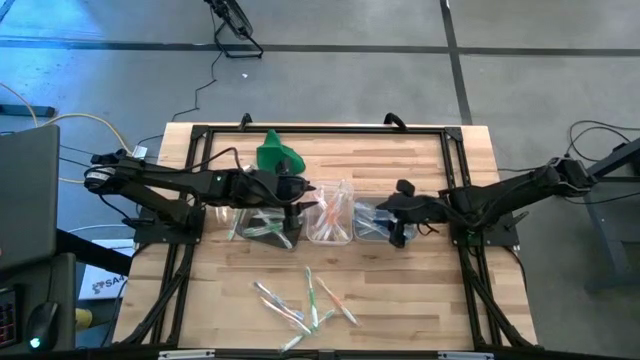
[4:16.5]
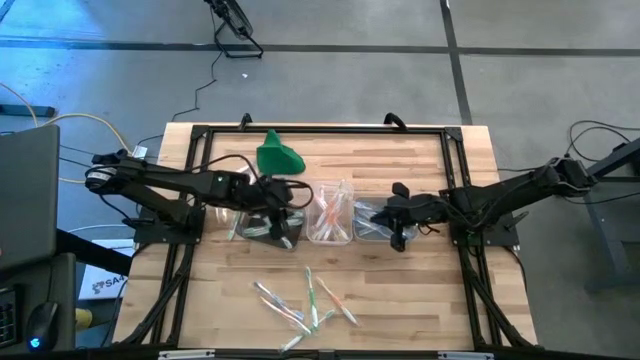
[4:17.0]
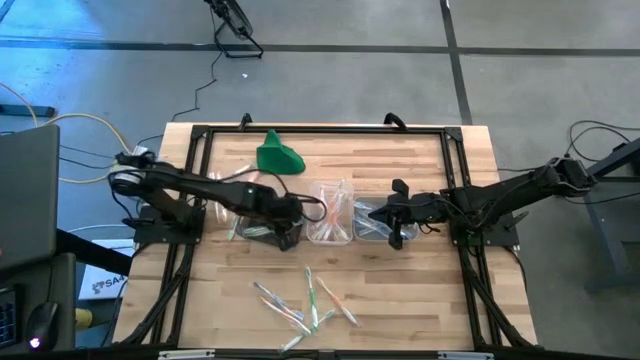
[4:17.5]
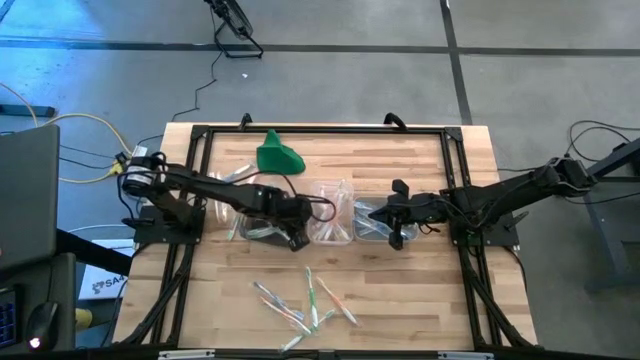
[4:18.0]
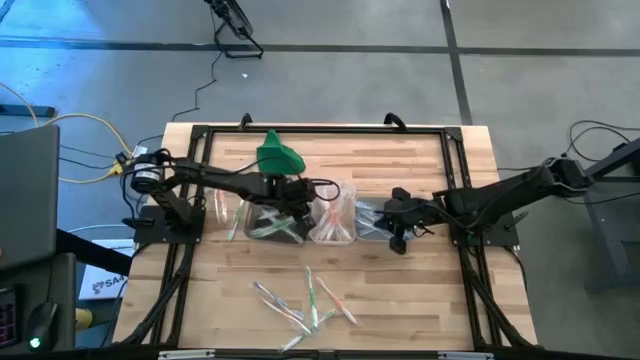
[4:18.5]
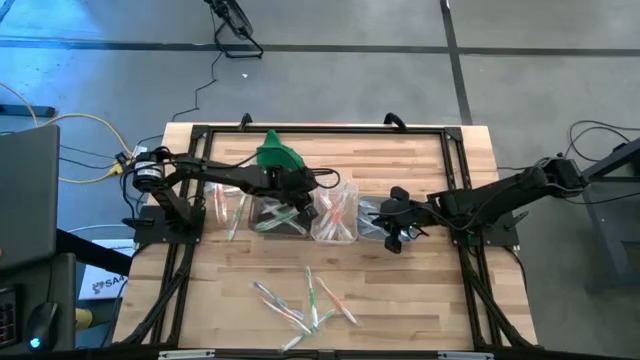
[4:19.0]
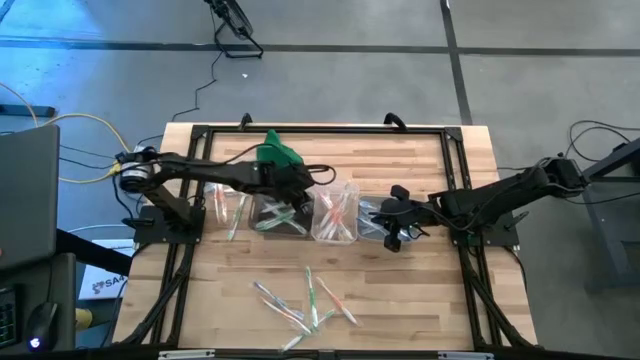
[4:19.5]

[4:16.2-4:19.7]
Task: Pick & Place Toothbrushes
Adjust the black bin on the table

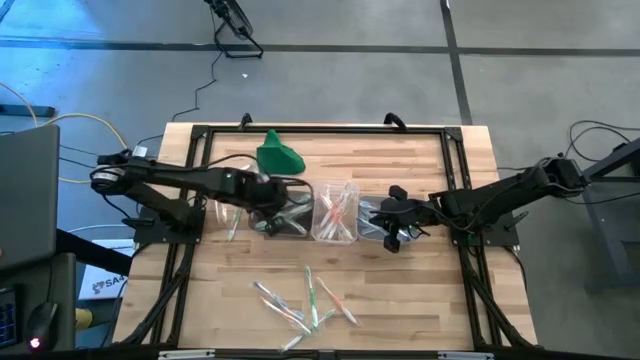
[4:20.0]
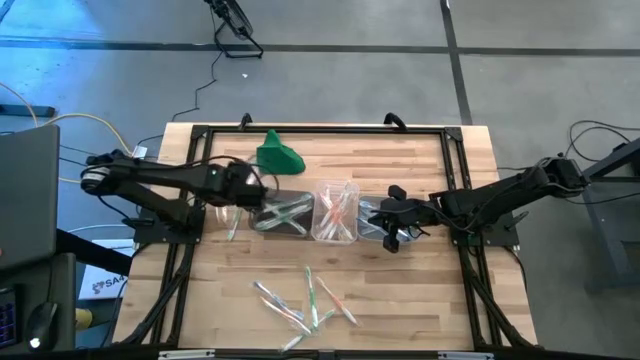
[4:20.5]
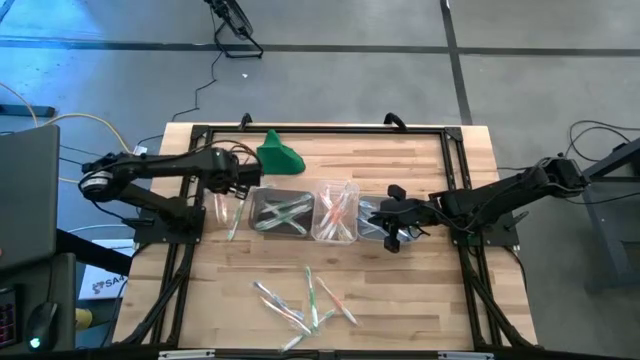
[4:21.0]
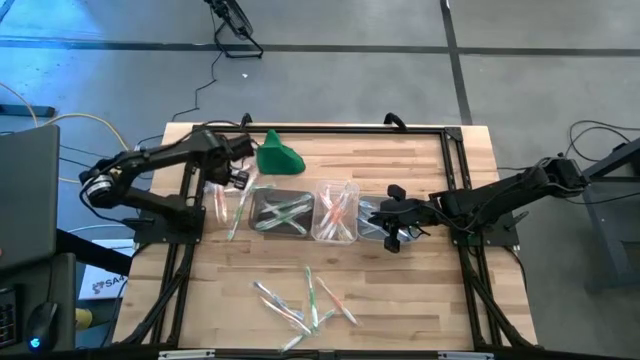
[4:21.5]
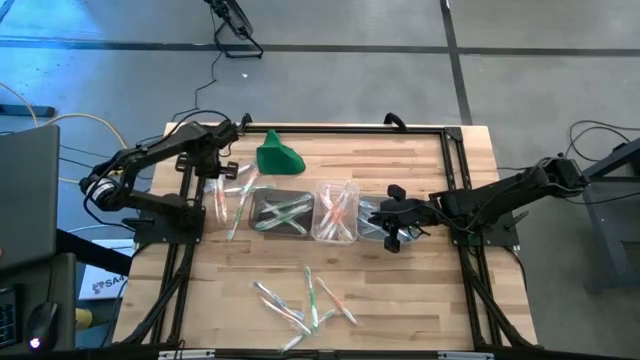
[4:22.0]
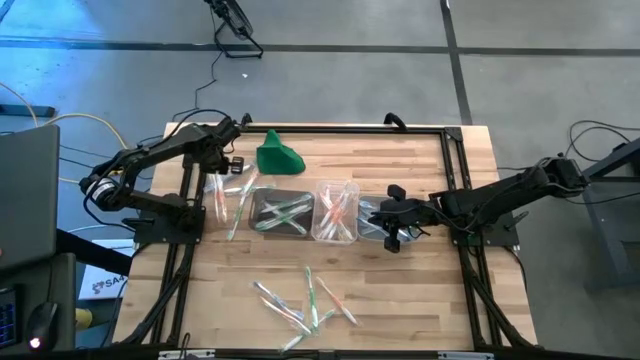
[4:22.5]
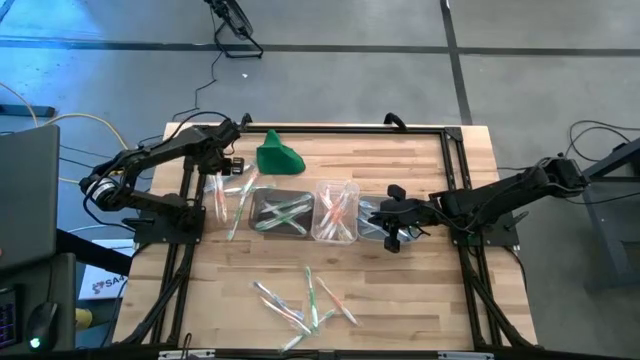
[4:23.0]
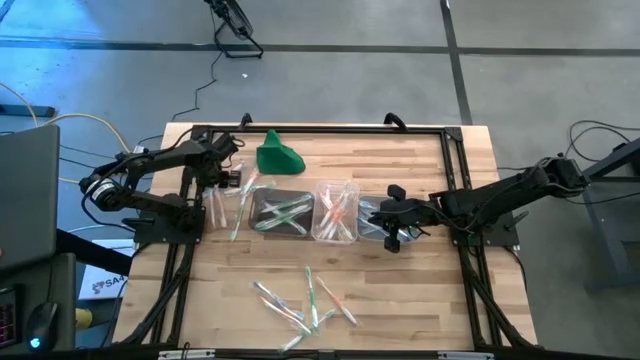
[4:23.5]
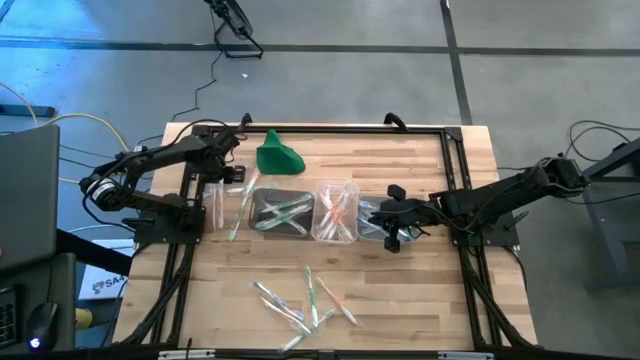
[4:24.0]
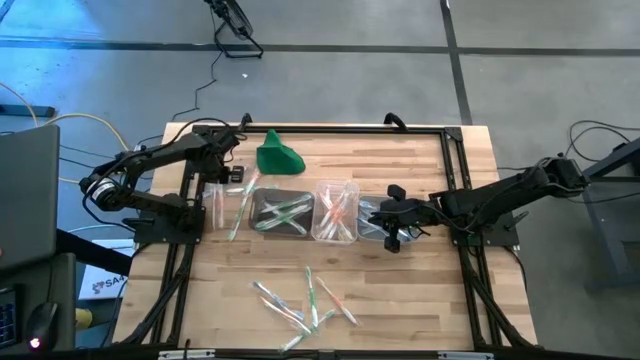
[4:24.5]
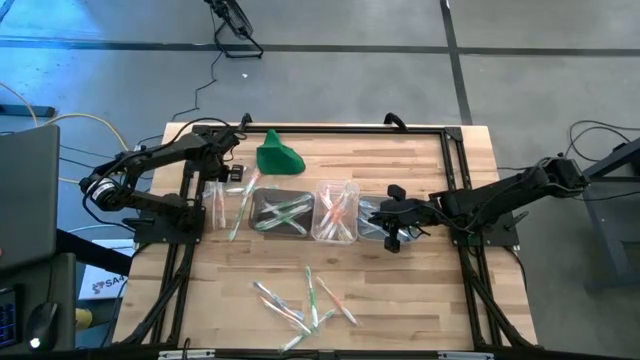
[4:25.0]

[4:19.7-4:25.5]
Put the orange toothbrush into the transparent bin

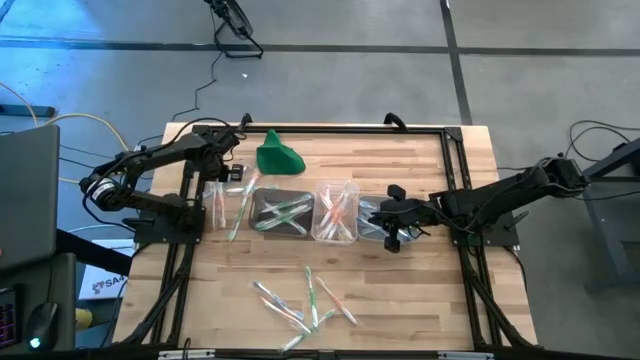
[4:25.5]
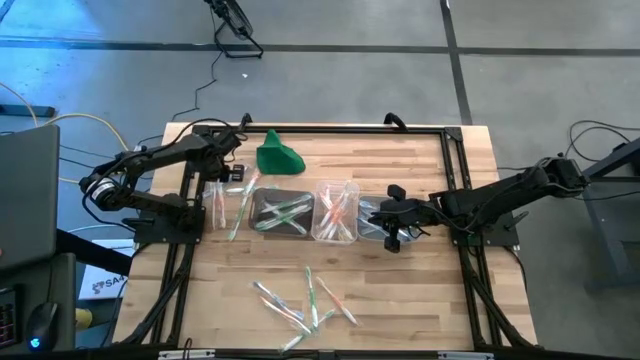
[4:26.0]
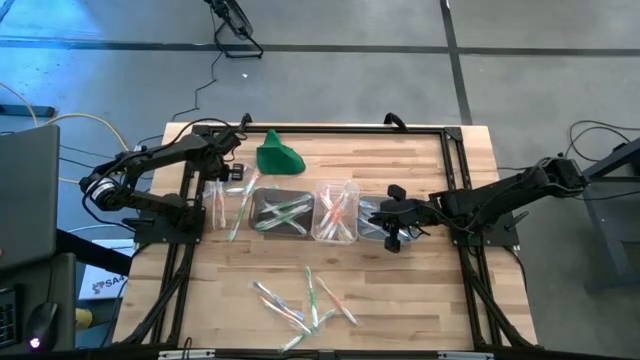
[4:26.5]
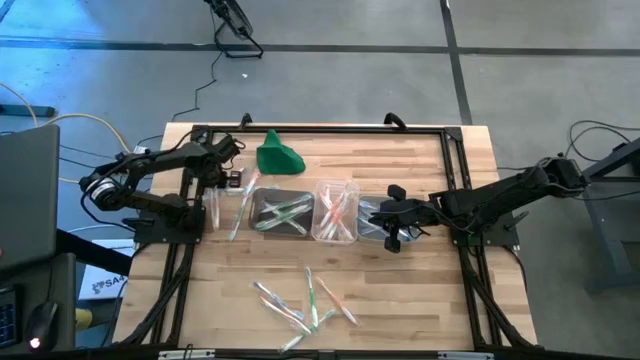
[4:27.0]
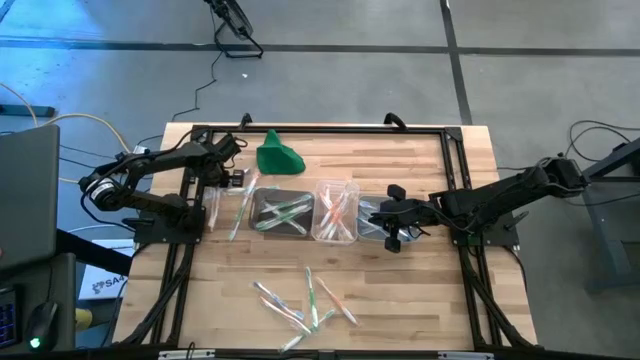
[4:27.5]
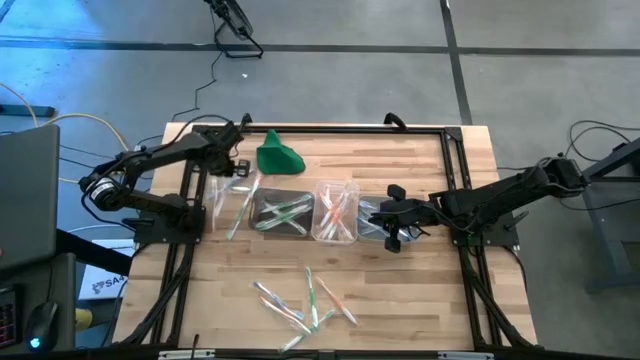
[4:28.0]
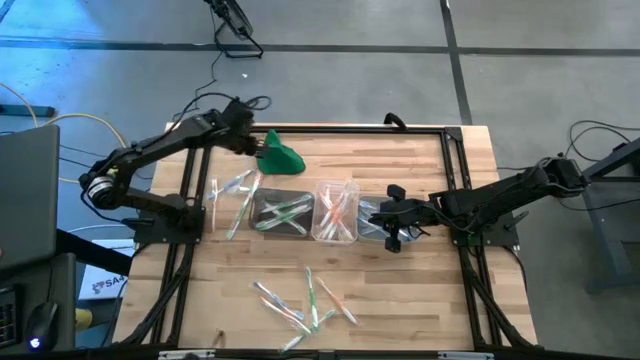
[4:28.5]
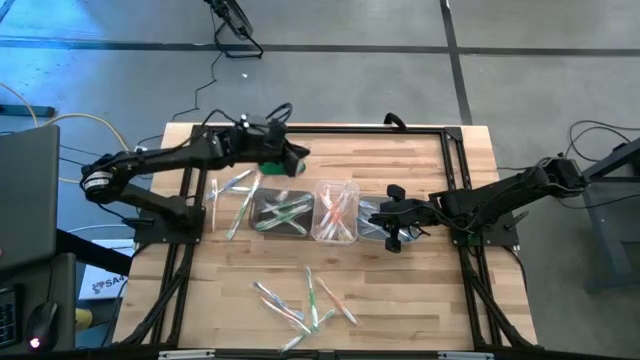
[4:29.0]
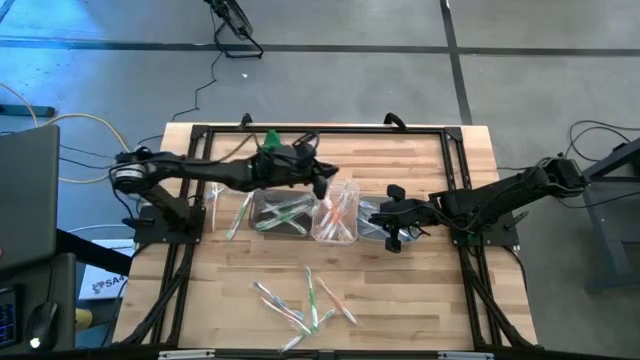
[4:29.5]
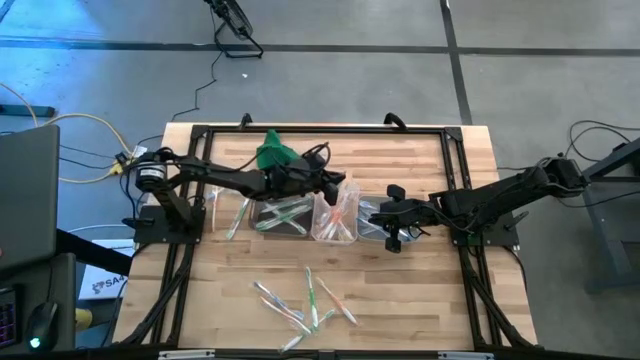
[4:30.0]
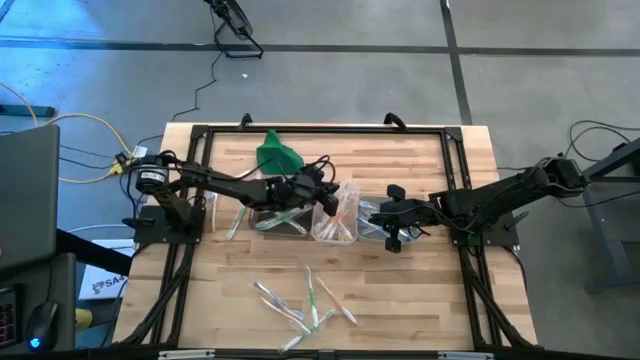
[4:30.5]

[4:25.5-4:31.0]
Put the orange toothbrush into the transparent bin

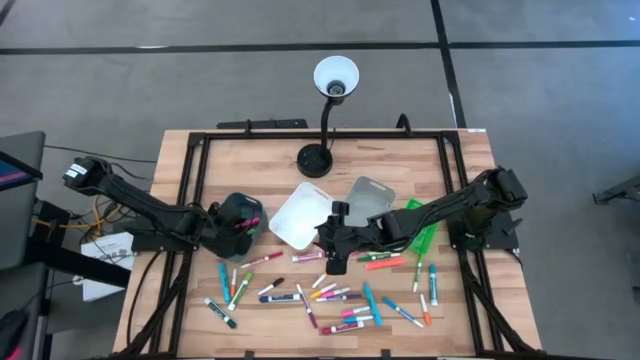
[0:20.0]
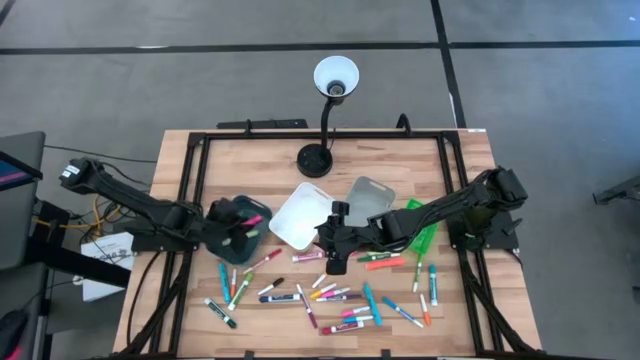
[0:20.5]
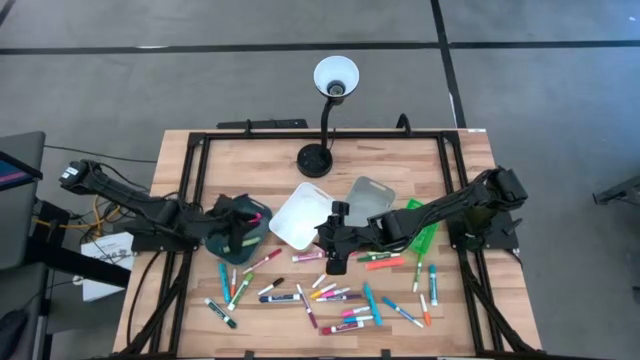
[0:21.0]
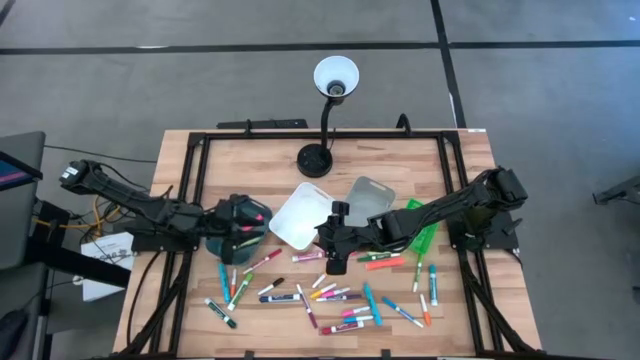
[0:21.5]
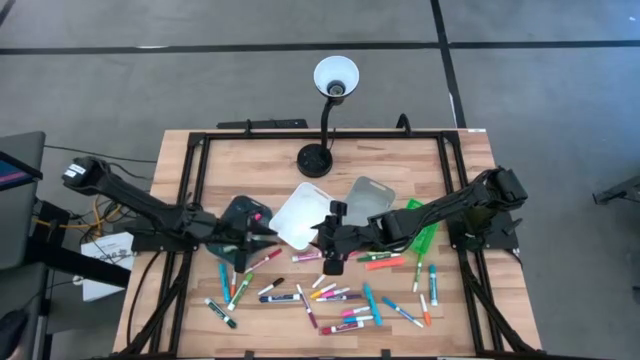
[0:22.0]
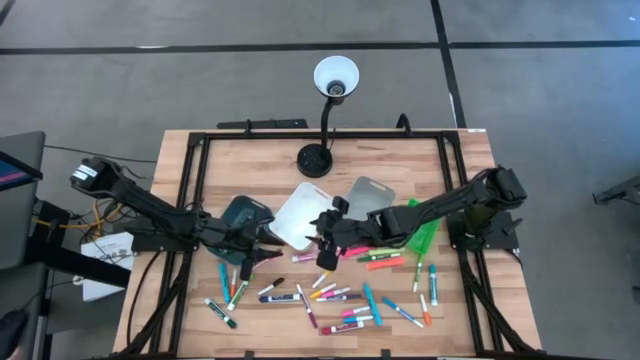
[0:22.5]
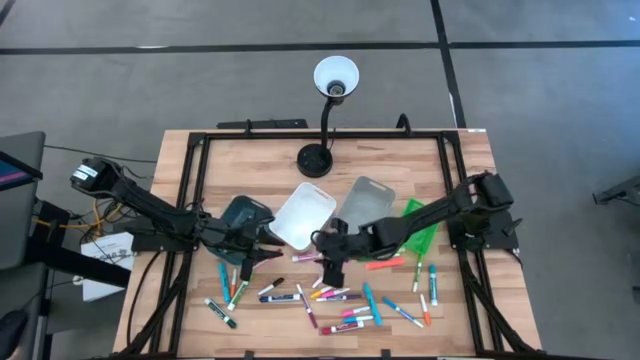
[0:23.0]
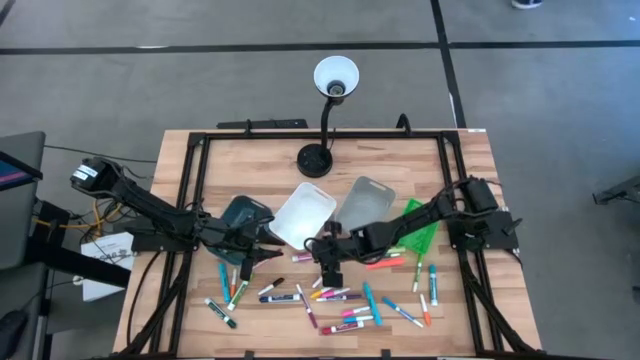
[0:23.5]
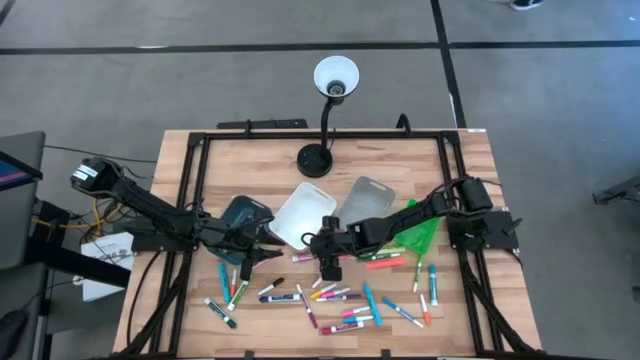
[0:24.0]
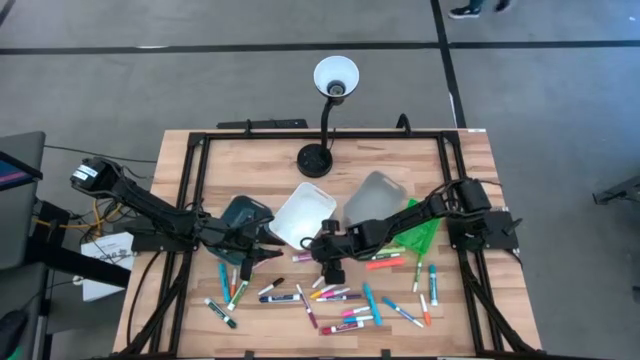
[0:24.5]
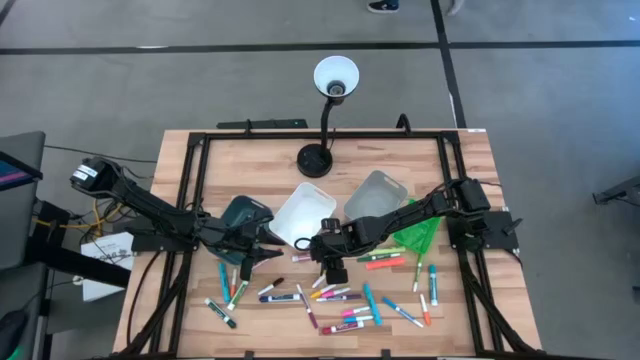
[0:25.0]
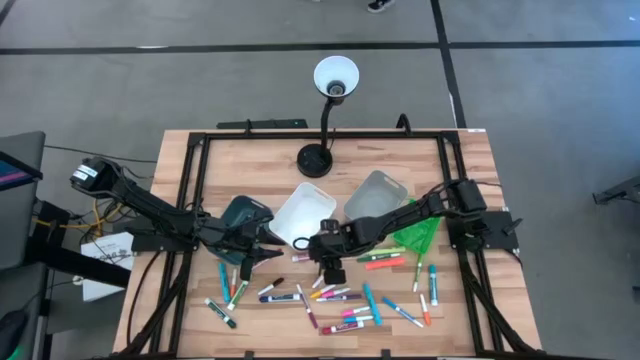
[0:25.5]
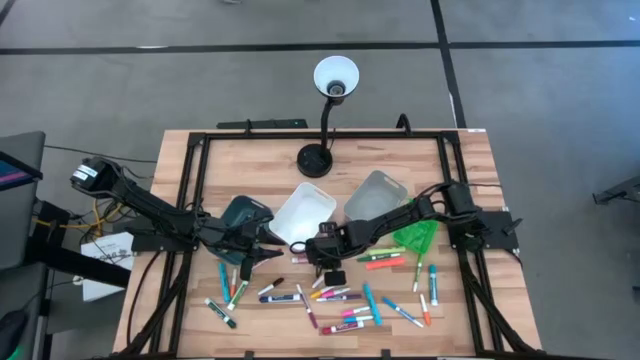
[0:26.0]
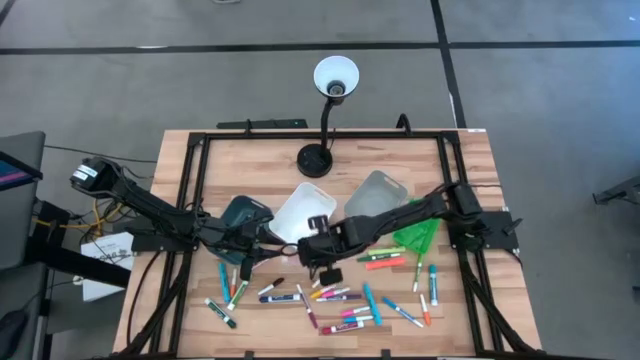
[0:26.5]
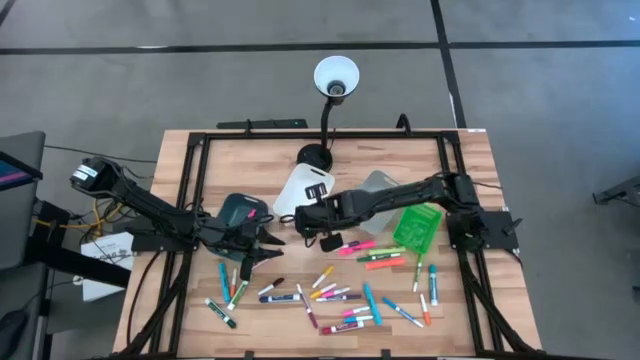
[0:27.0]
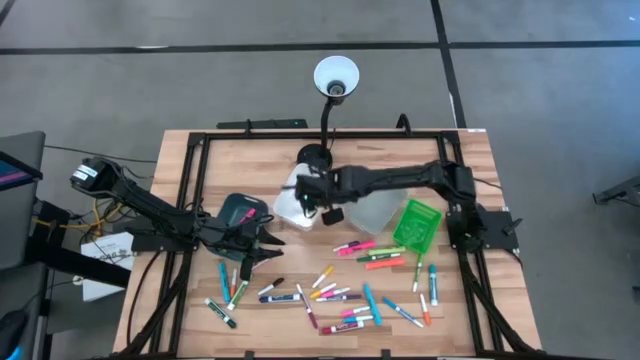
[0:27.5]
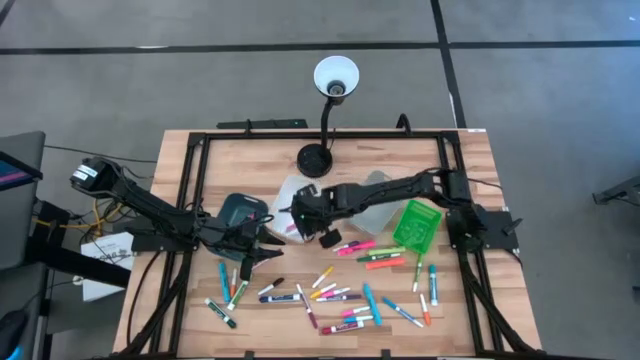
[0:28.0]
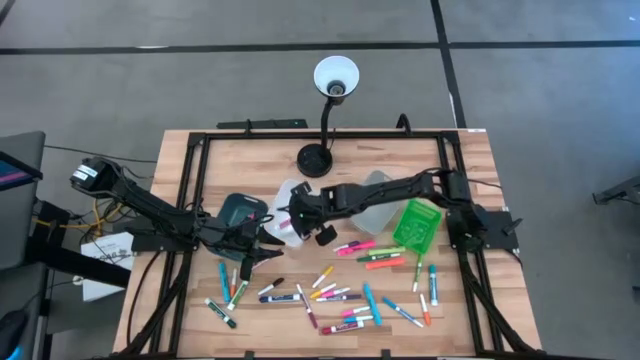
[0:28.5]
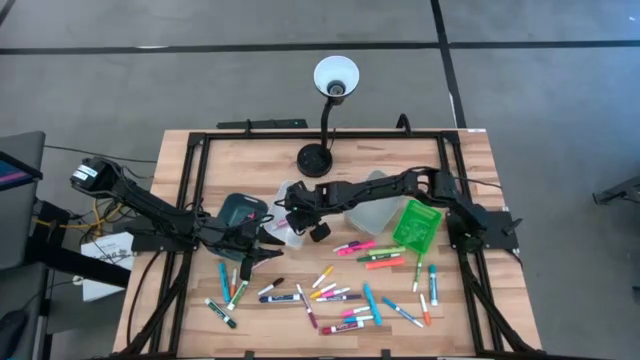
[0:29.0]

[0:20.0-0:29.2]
Task: Pick & Place Markers
Put the pink dry erase marker into the white bin
